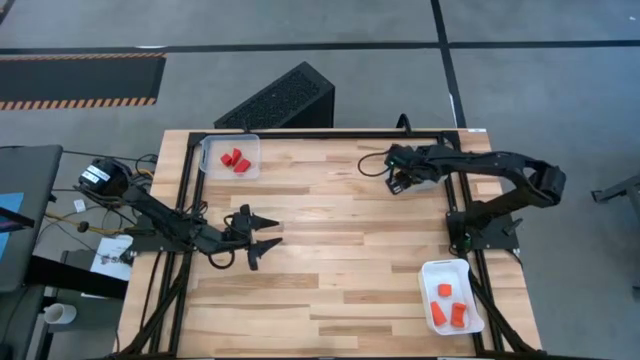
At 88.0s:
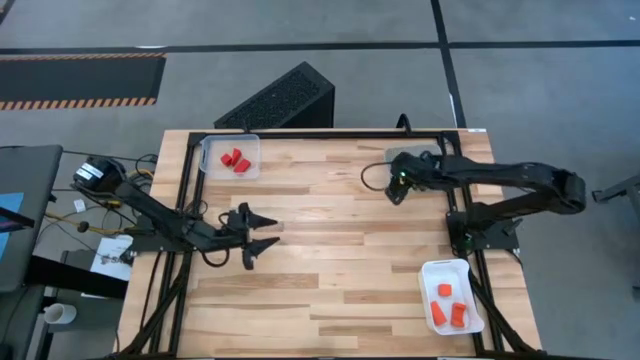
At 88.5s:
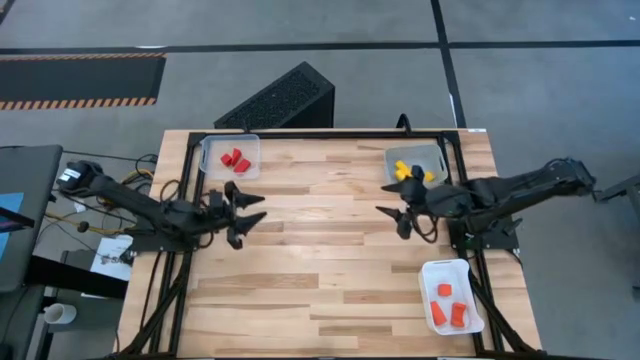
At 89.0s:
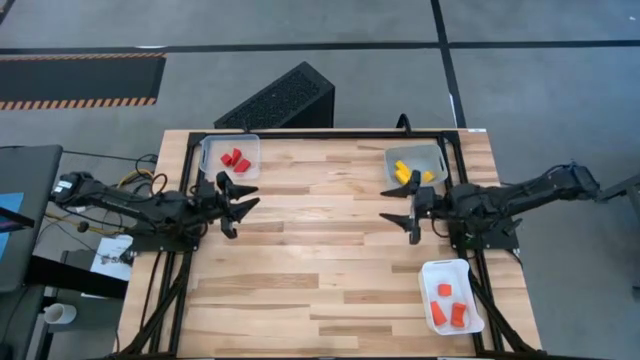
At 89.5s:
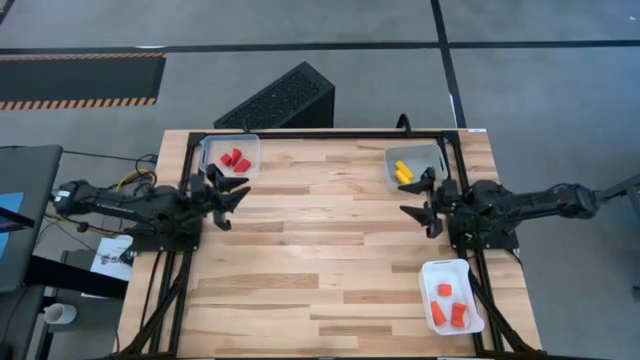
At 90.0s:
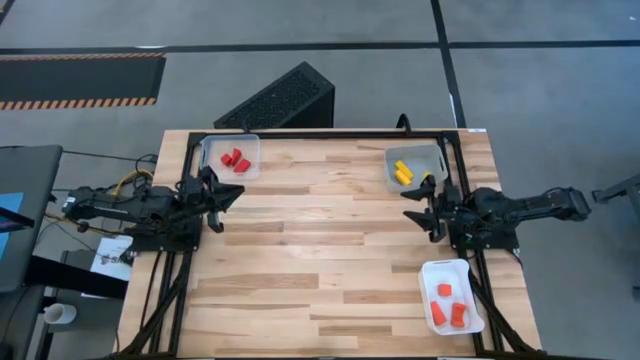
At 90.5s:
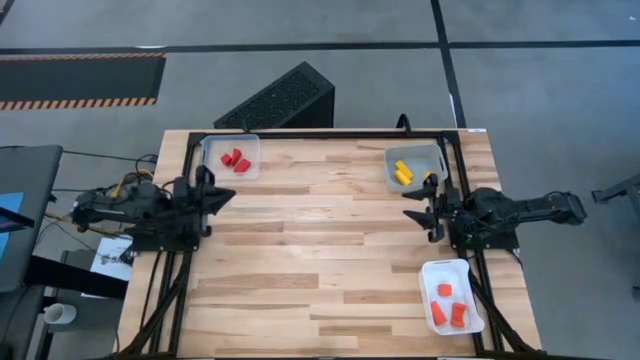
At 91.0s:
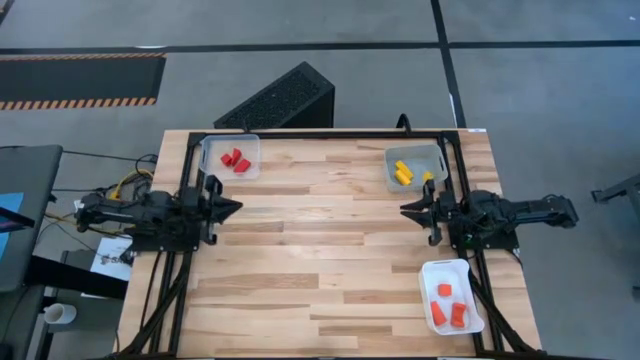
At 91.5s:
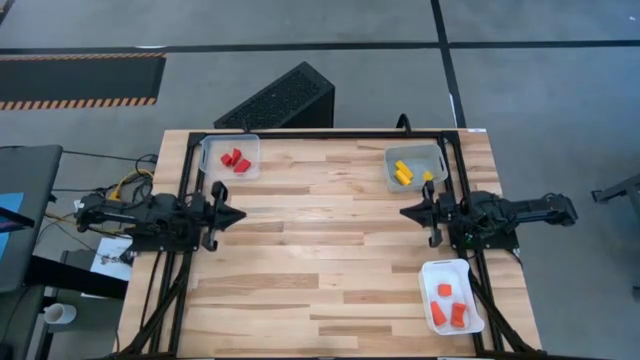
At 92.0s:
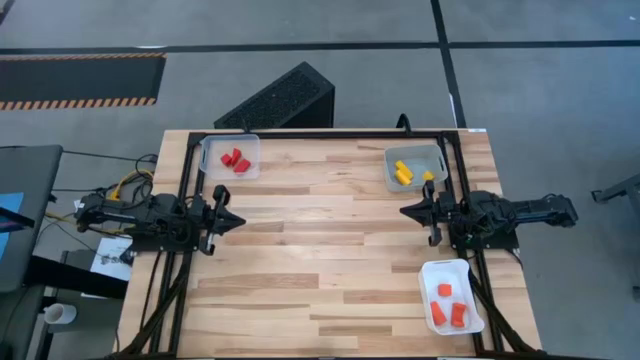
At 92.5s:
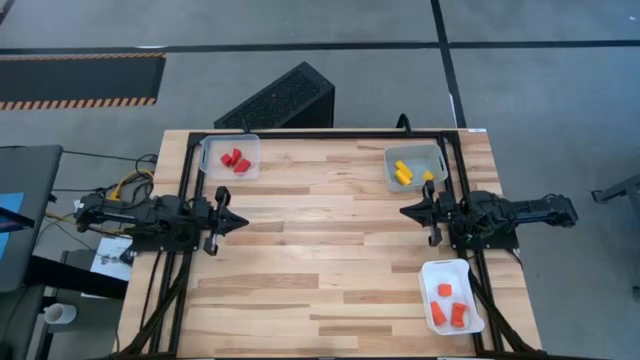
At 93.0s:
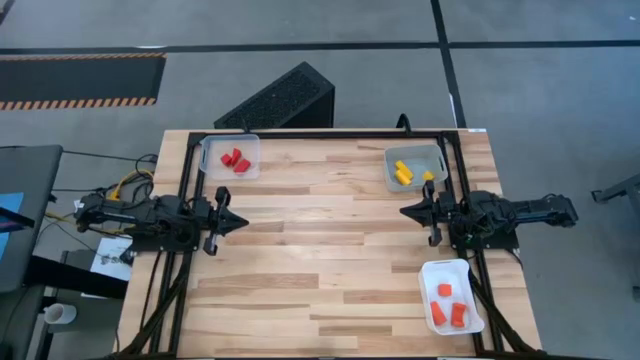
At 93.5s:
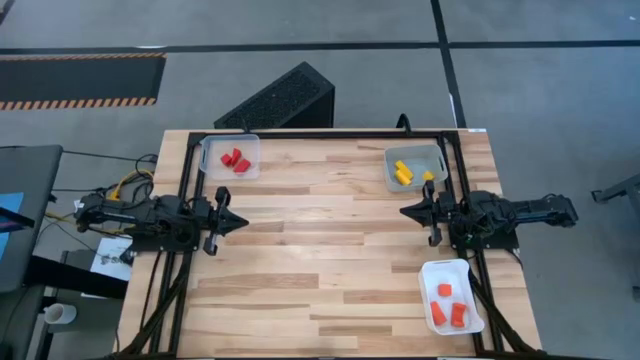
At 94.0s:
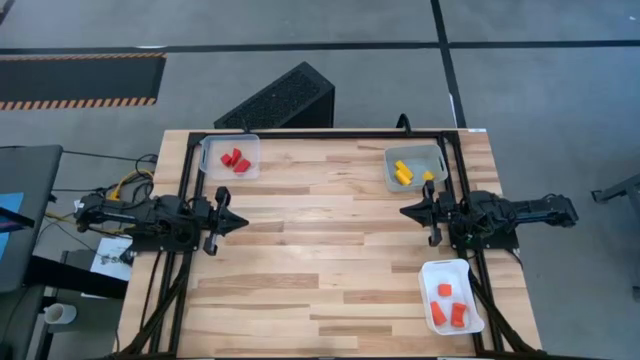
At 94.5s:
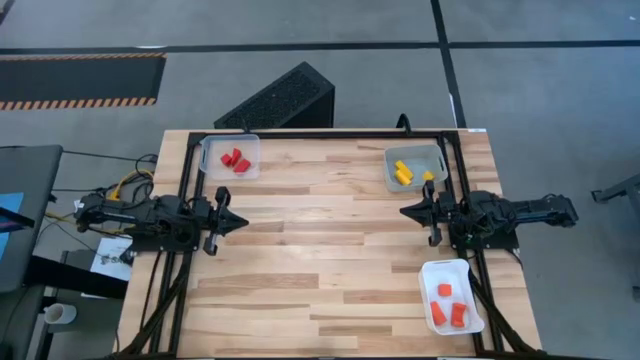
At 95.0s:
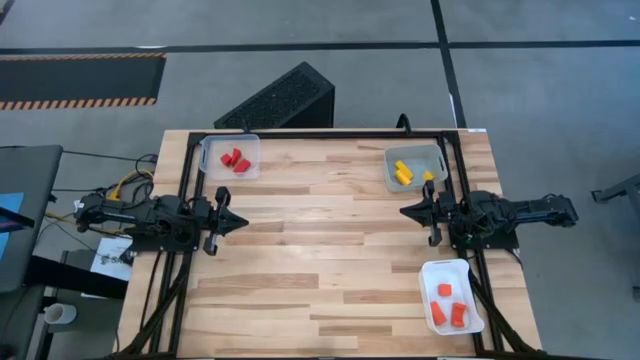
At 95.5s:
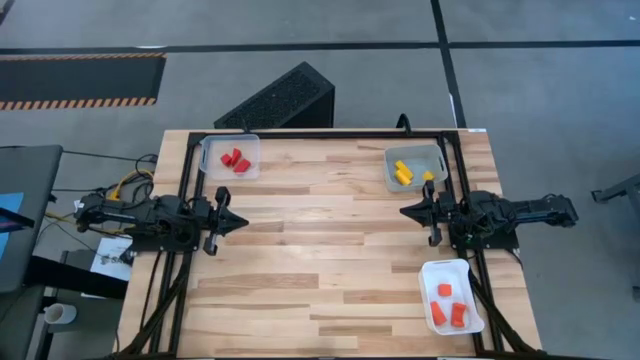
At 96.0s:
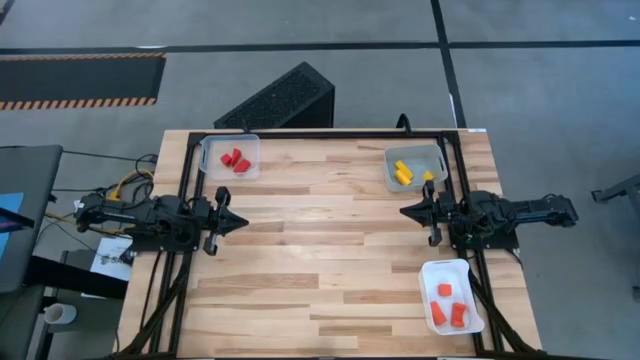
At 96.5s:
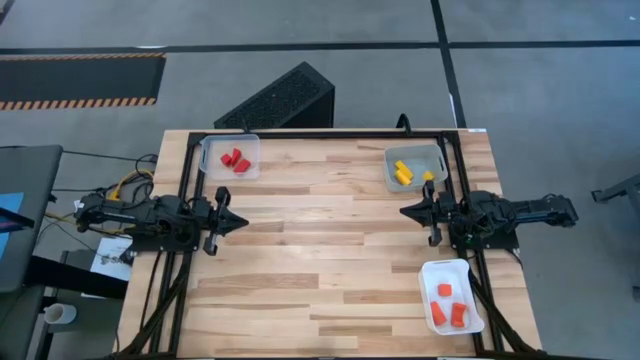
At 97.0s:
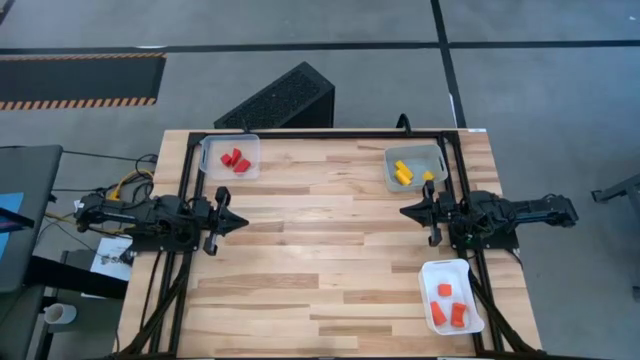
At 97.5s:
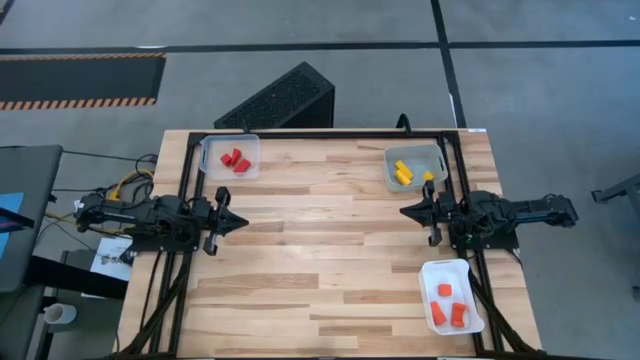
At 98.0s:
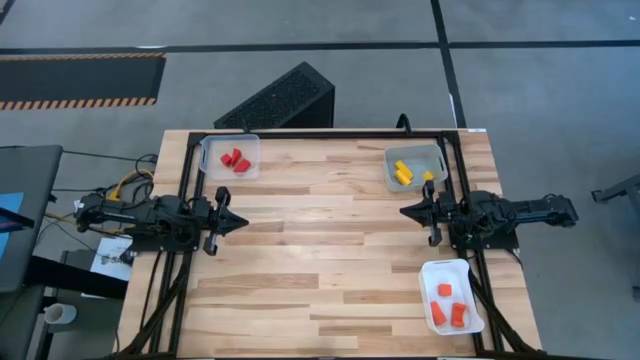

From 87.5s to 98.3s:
Task: Sort & place blocks by color
Return to Home Position

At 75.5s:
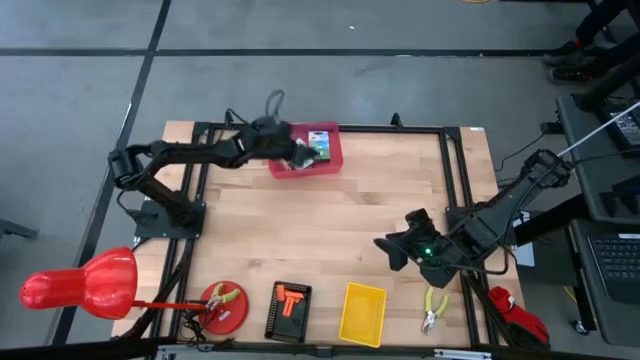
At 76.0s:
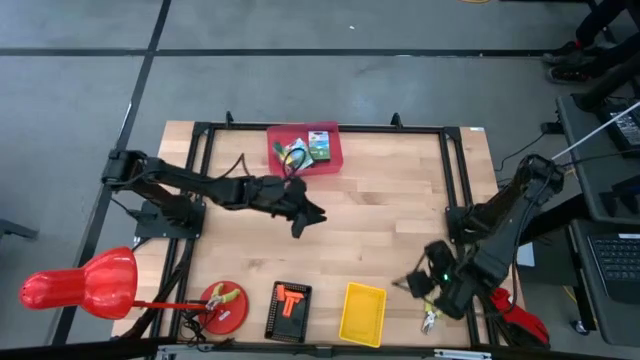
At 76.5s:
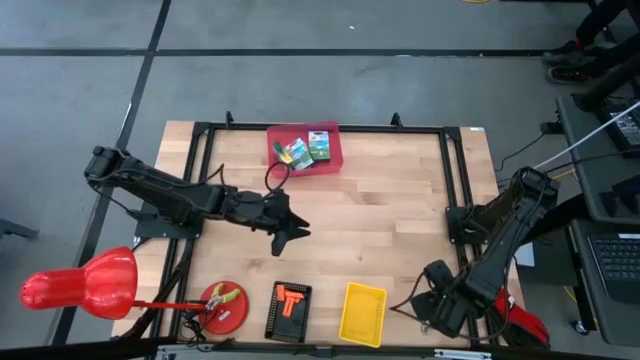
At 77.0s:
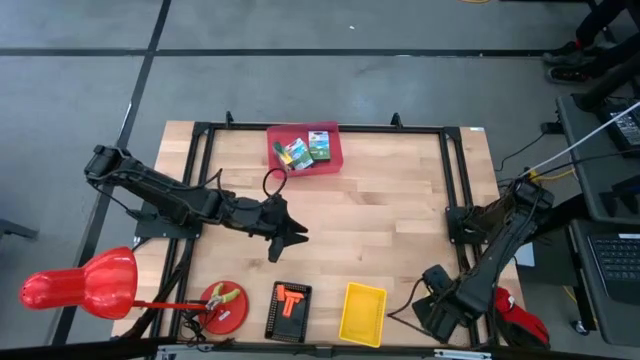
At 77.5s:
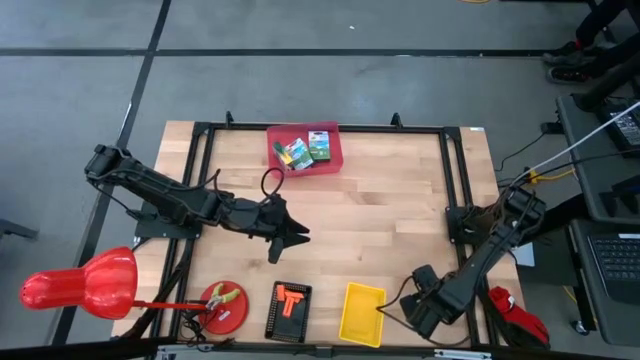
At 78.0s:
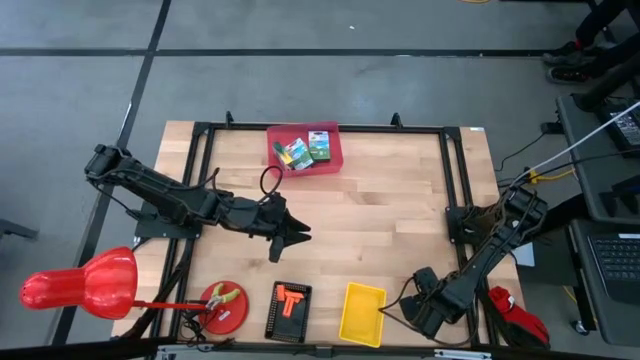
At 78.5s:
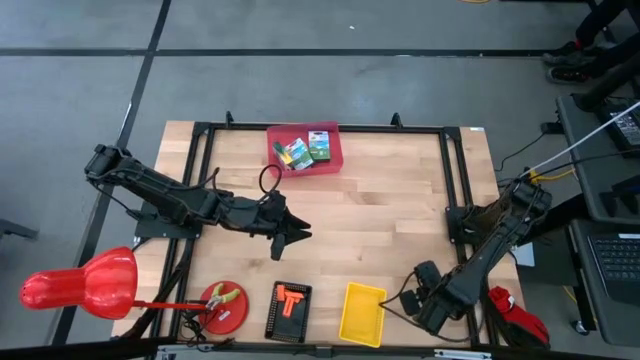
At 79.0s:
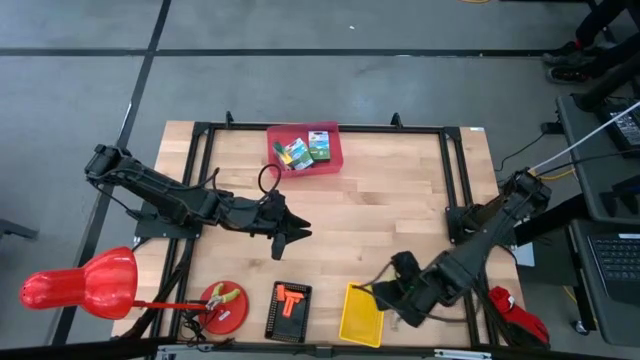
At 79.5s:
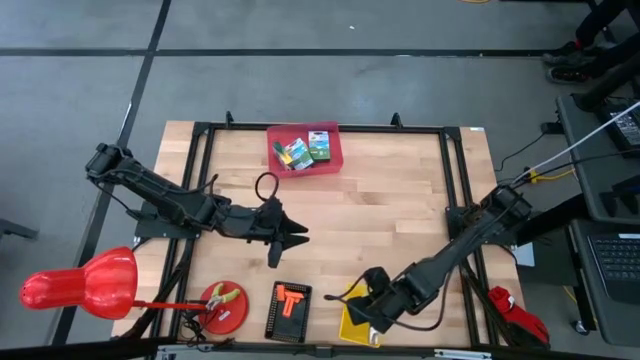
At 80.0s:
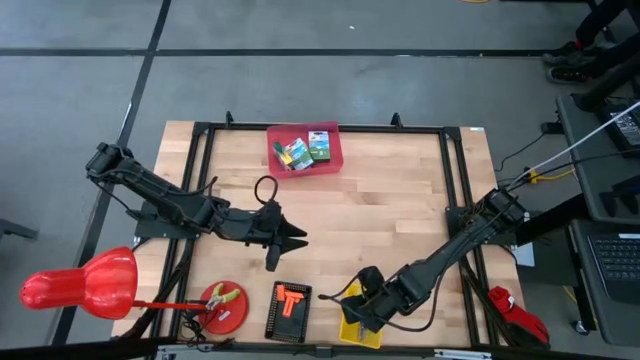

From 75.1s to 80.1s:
Task: Pick & Place School Supplies
Put the green hole puncher into the yellow bin

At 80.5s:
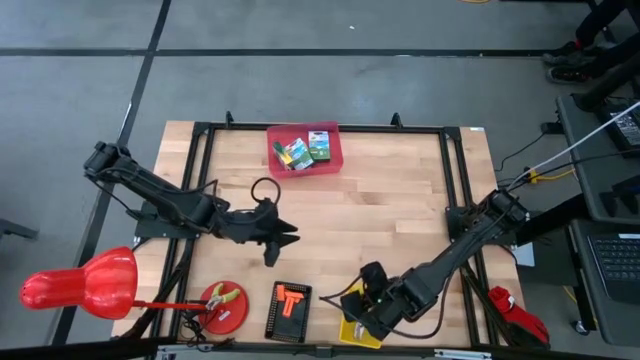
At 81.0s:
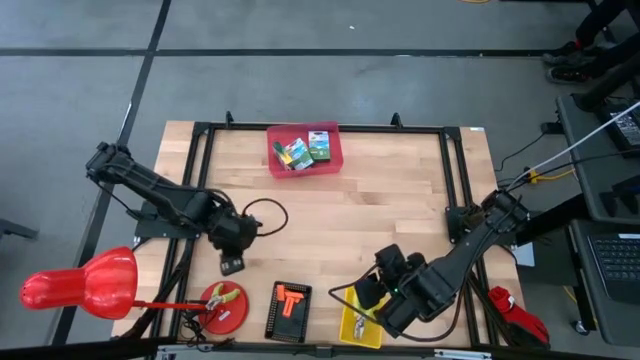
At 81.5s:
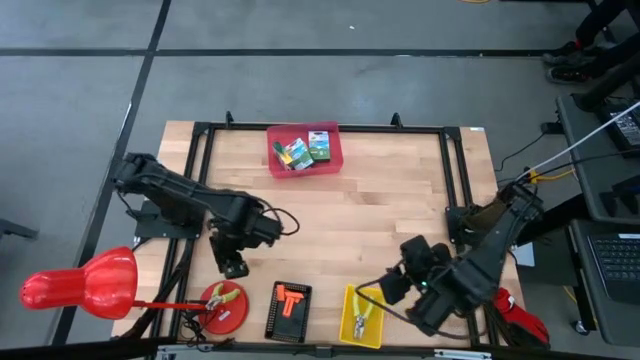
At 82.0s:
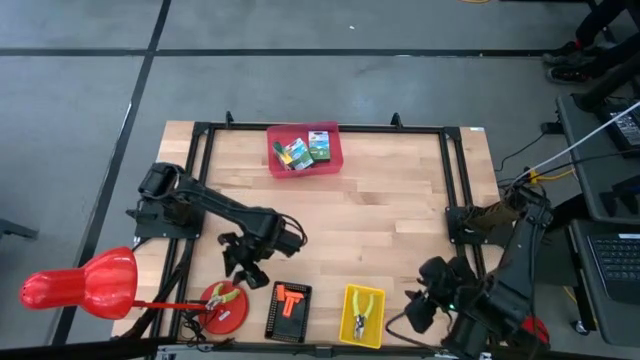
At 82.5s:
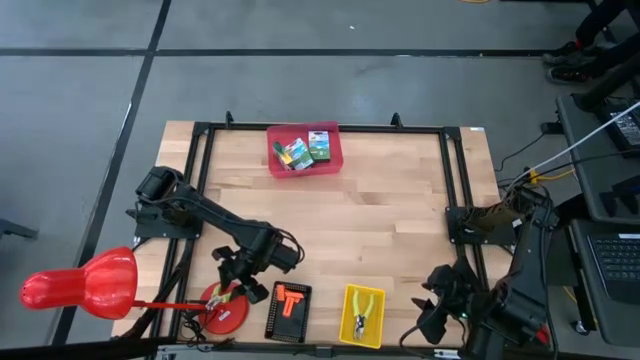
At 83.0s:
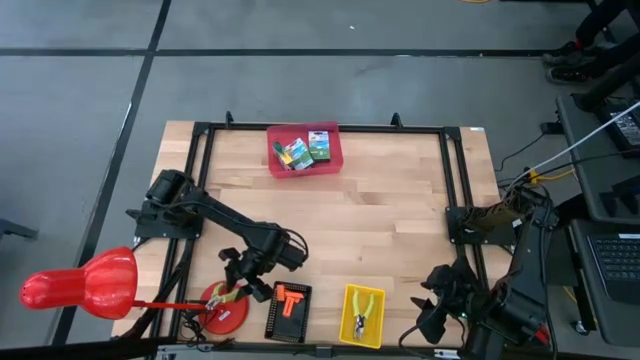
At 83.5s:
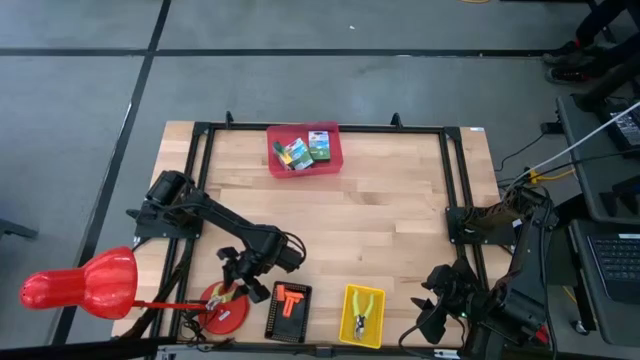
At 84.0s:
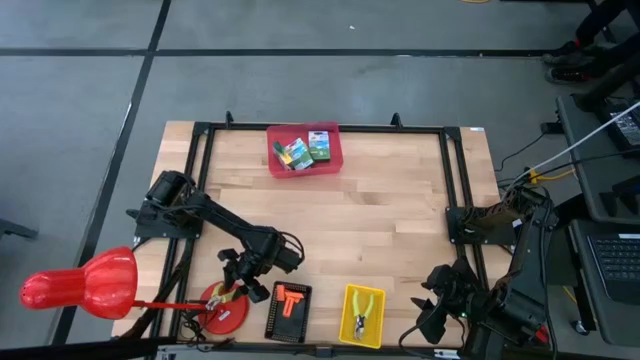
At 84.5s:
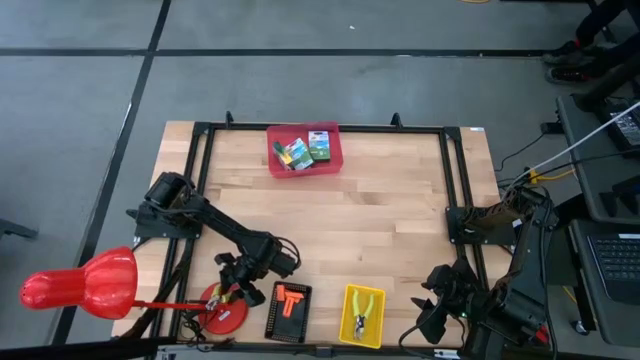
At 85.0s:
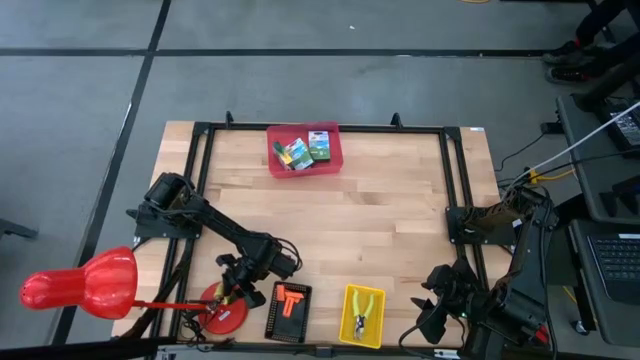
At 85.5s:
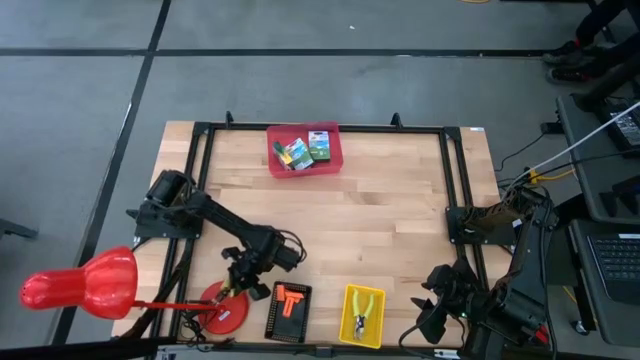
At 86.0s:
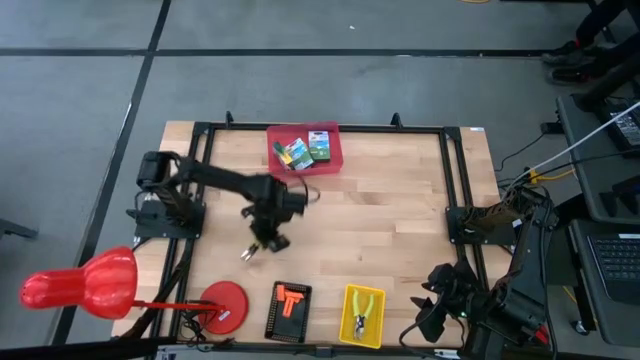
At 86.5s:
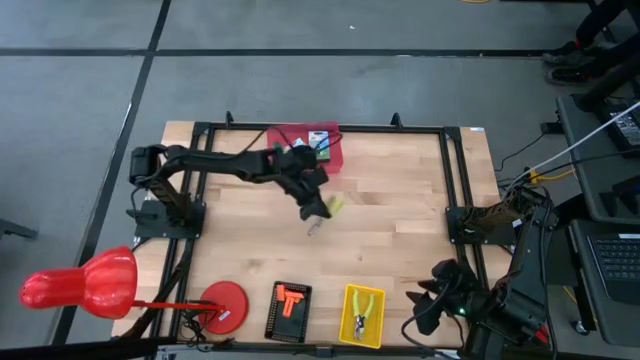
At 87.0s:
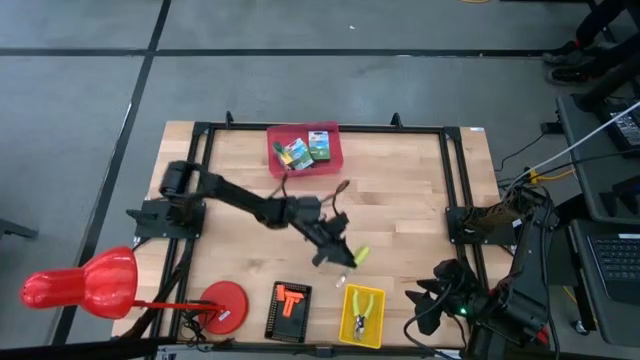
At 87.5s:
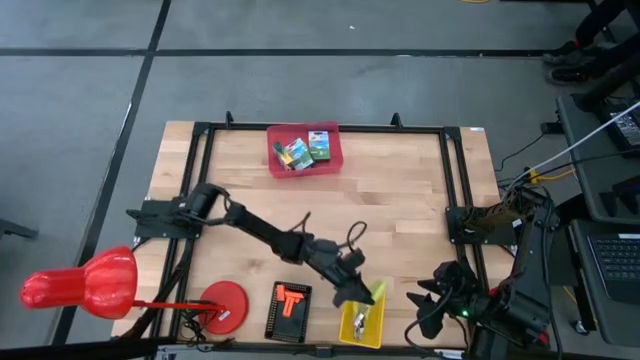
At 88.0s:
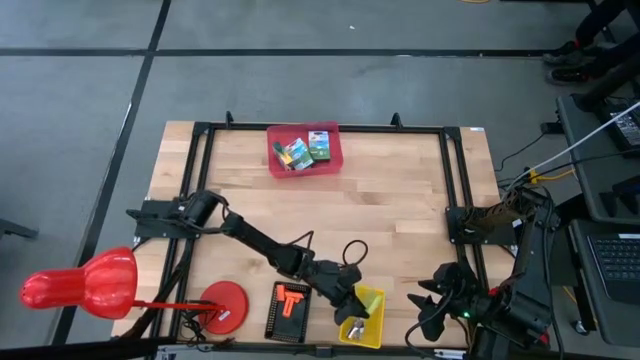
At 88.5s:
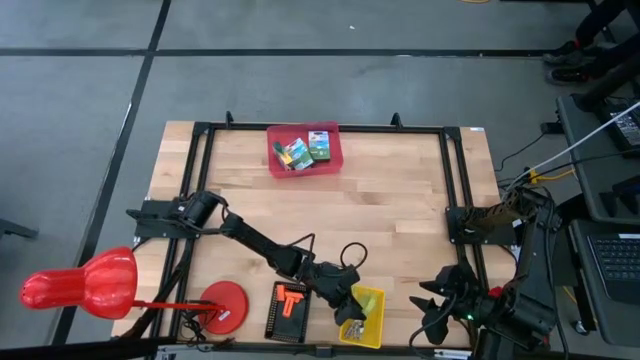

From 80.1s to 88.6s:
Put the green hole puncher into the yellow bin
